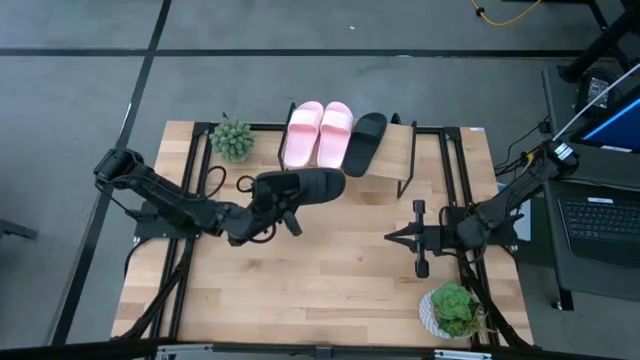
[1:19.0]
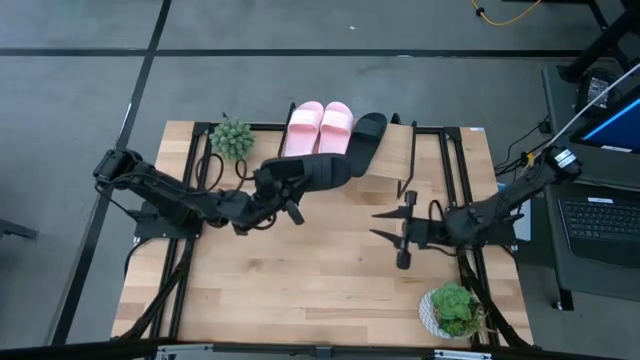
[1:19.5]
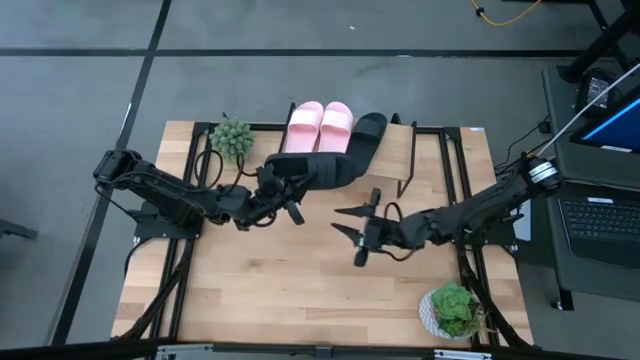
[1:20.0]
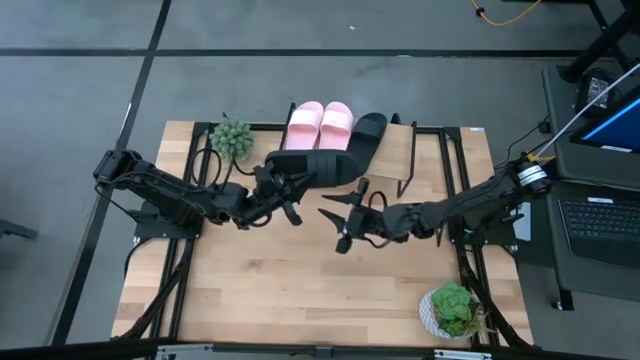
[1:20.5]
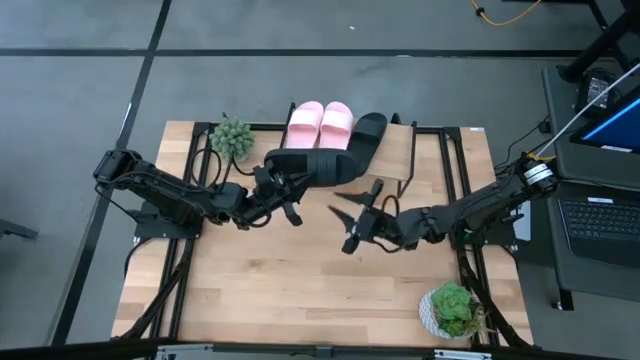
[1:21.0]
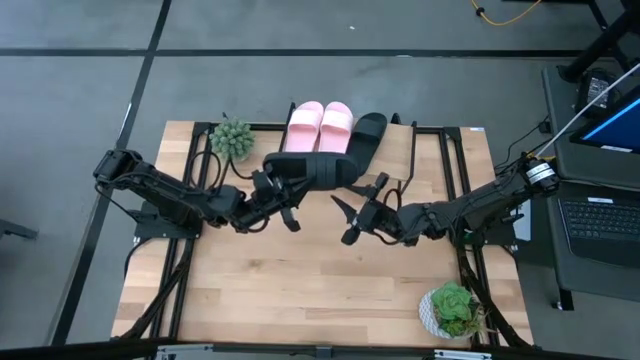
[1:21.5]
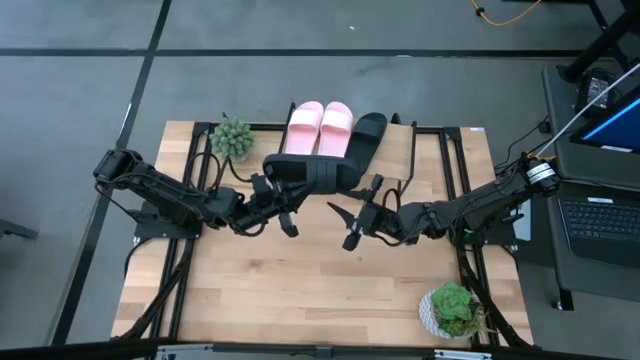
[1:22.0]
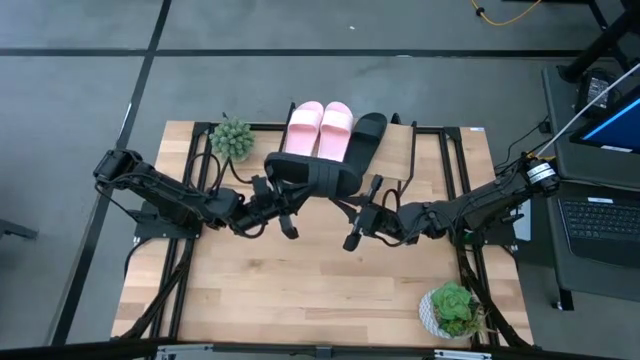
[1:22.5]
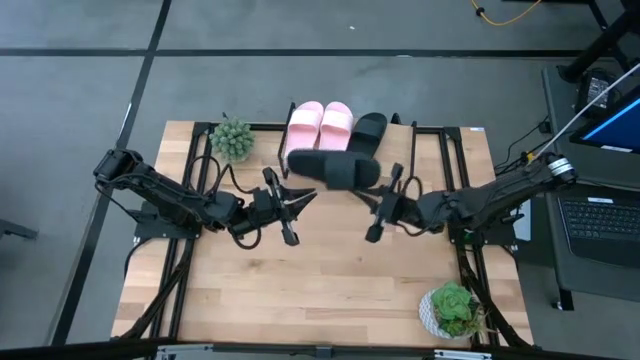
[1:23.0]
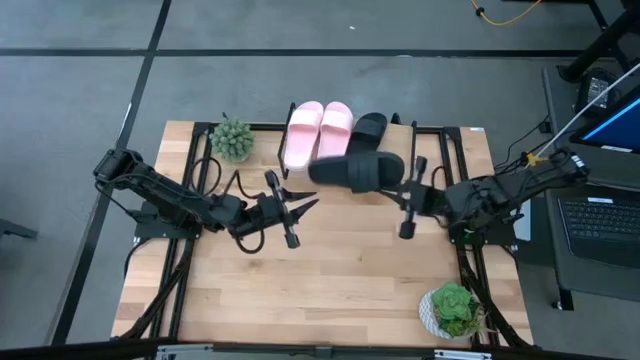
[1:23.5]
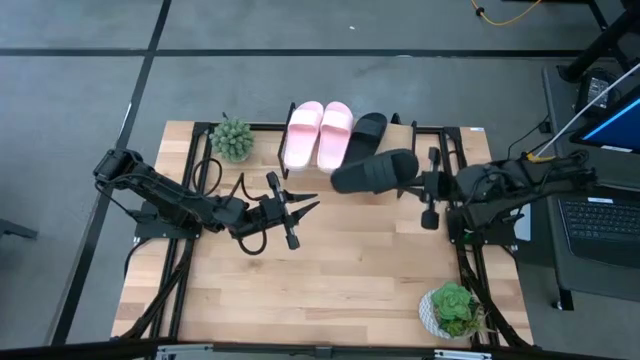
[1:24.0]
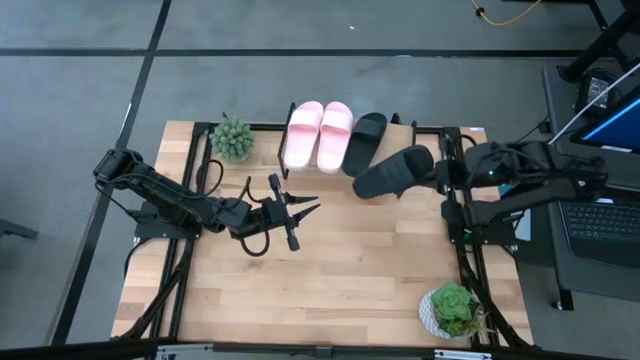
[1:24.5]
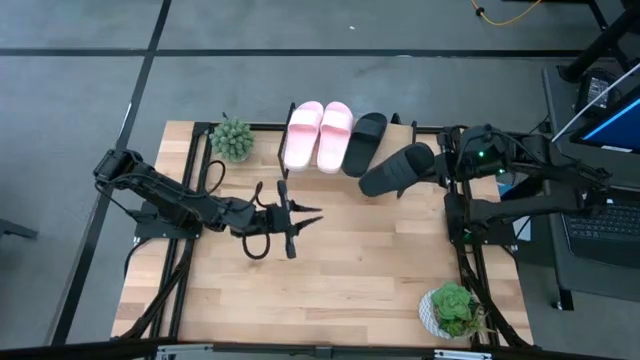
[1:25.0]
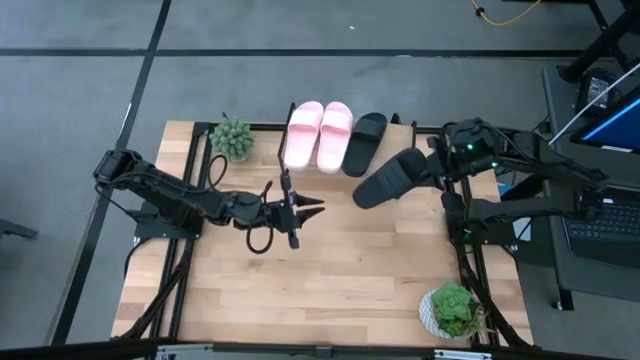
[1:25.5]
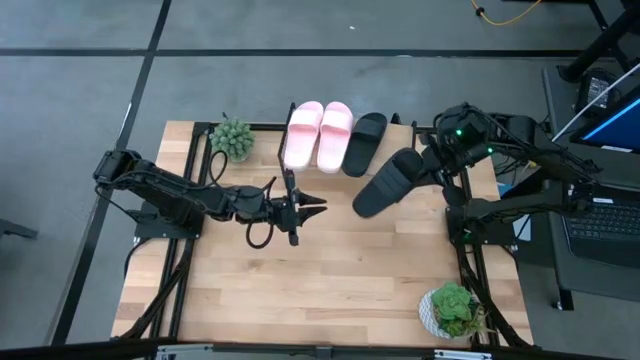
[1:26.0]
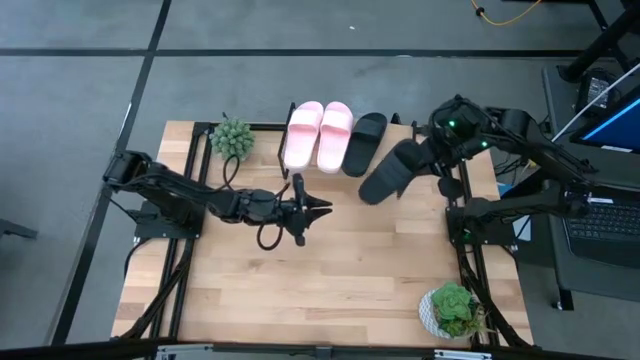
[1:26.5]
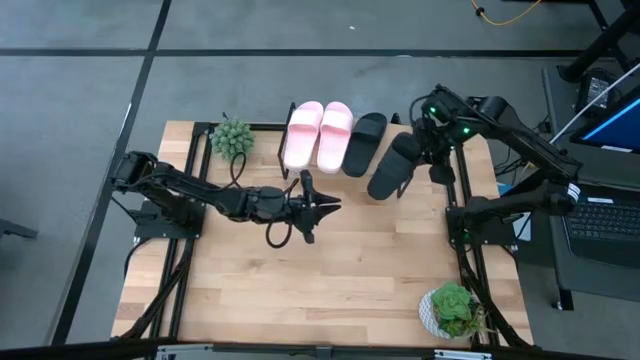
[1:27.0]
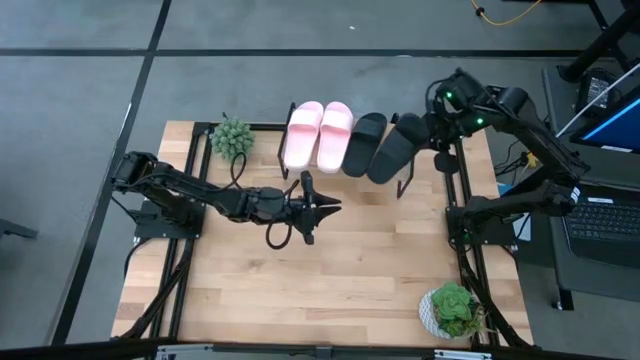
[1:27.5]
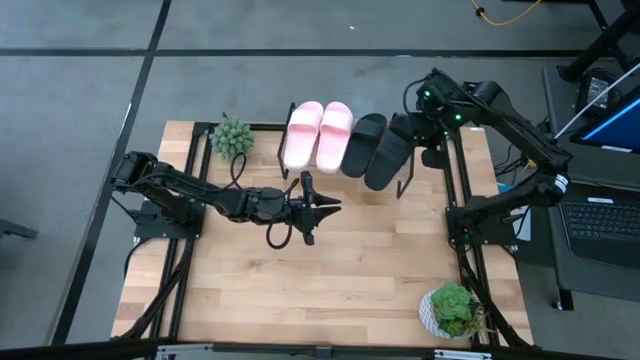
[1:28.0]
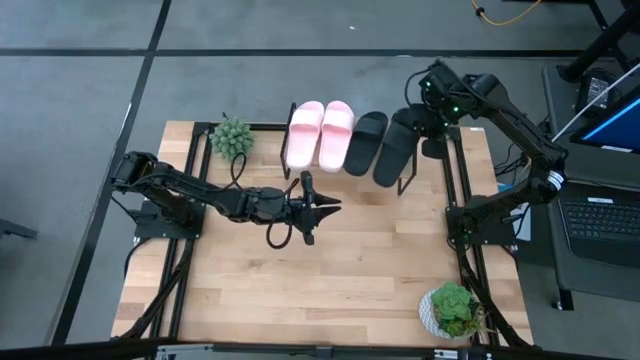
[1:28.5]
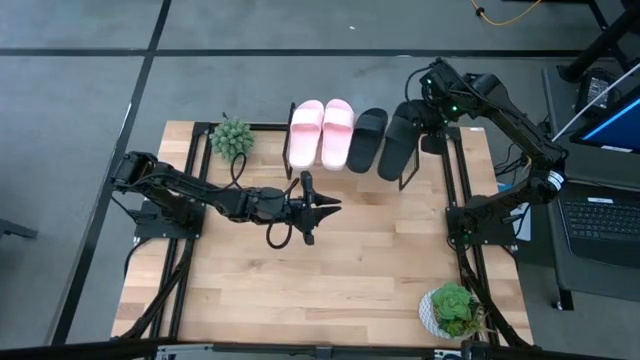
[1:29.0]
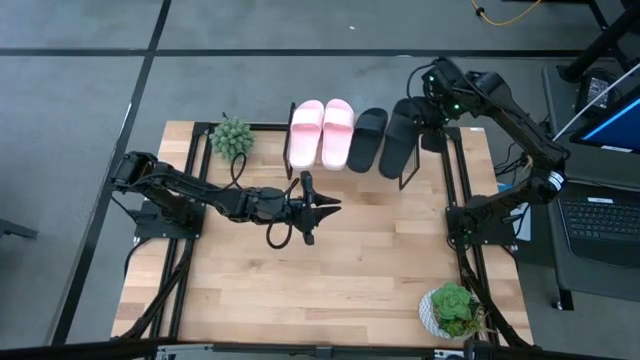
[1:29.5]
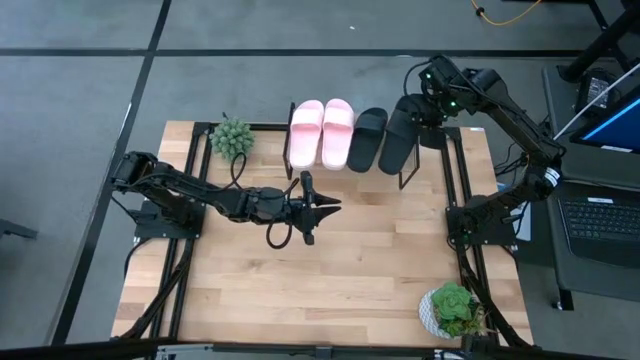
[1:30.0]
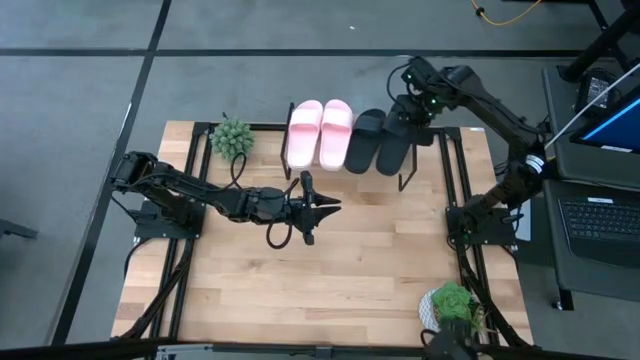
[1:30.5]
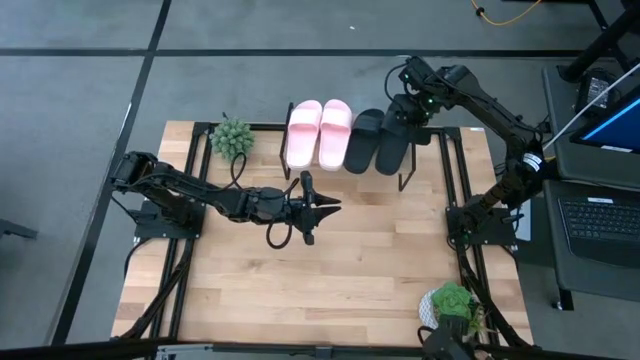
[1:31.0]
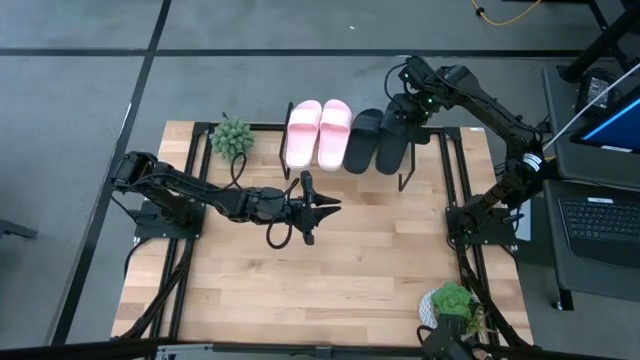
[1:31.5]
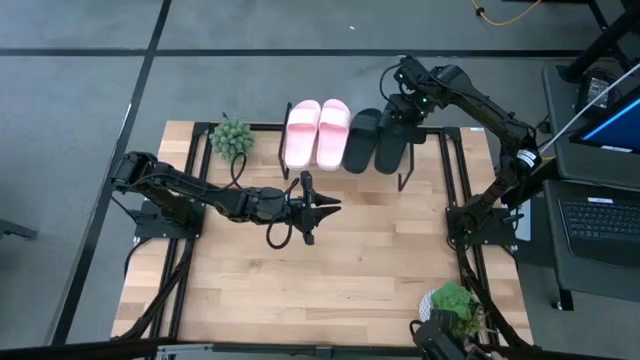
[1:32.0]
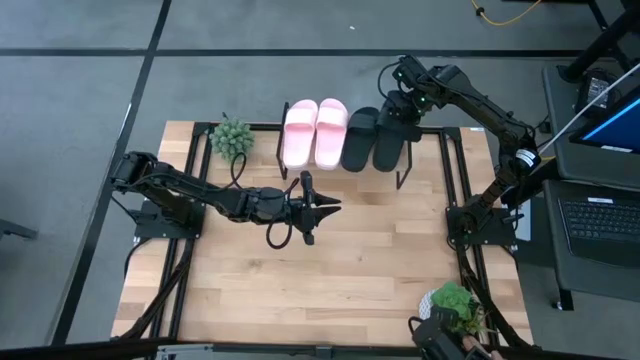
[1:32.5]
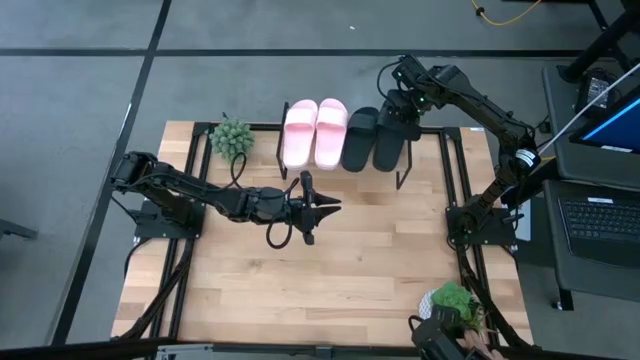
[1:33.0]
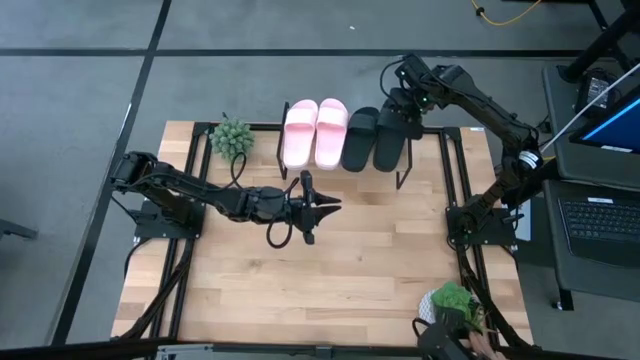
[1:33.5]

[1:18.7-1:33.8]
Task: Pick and place slides into the shelf
Put the black slipper on the shelf

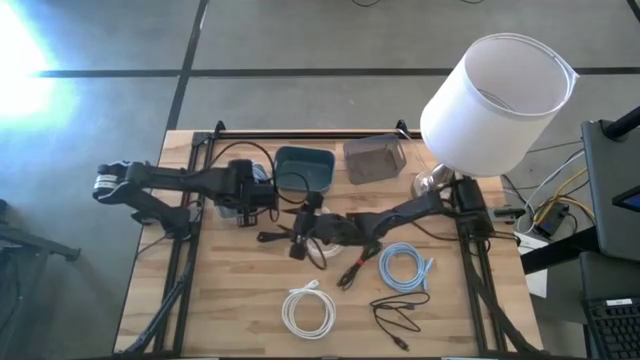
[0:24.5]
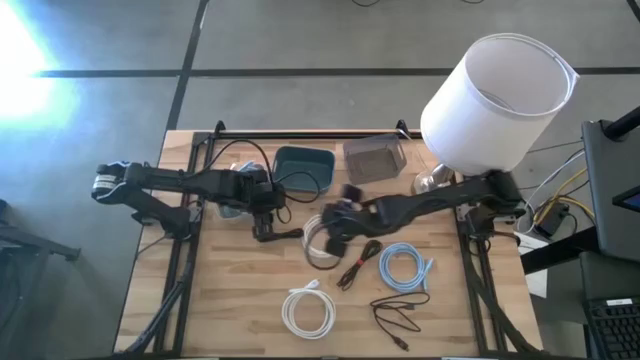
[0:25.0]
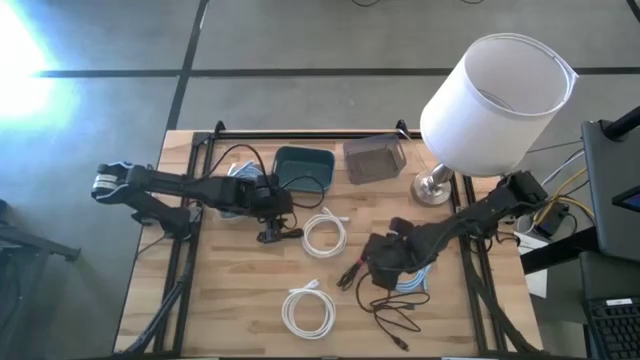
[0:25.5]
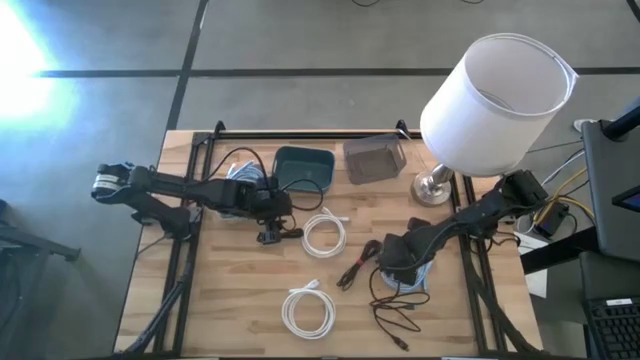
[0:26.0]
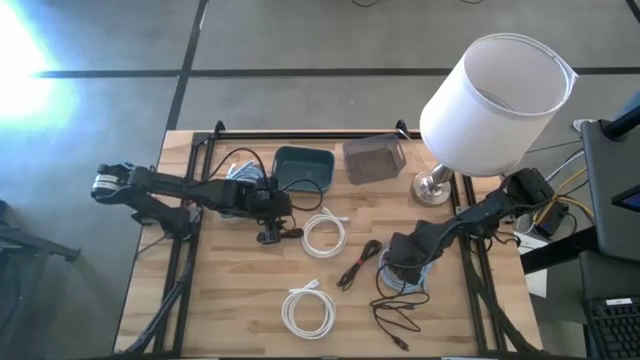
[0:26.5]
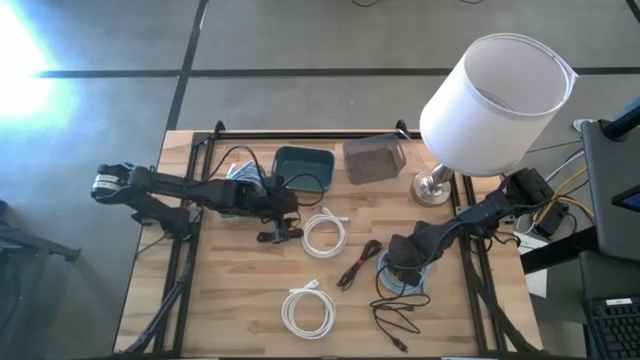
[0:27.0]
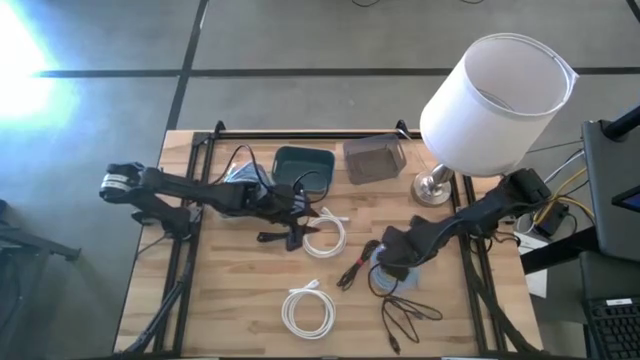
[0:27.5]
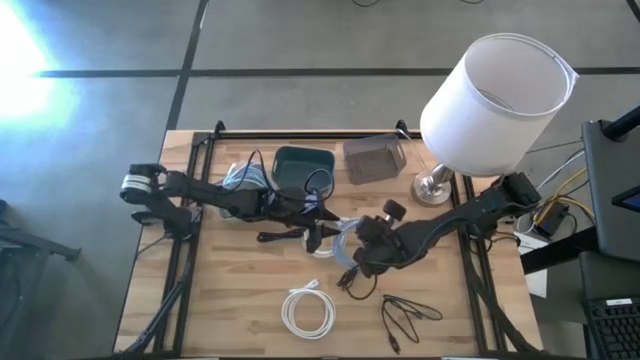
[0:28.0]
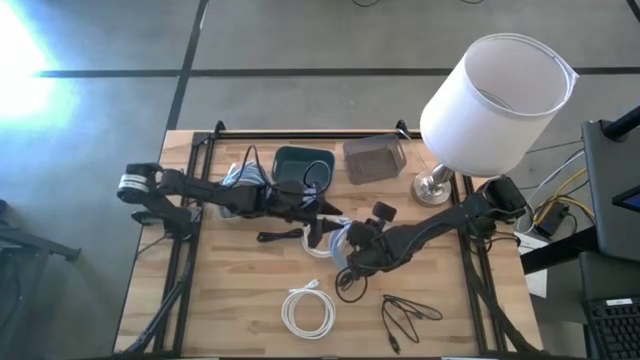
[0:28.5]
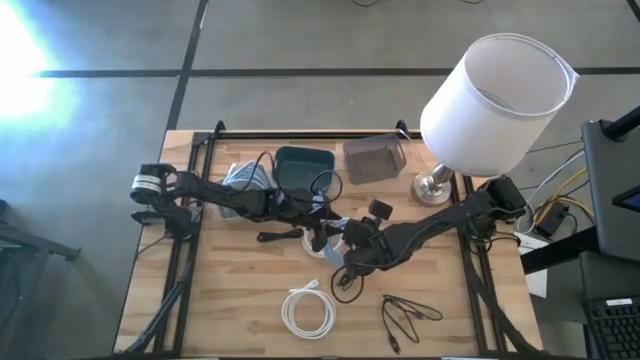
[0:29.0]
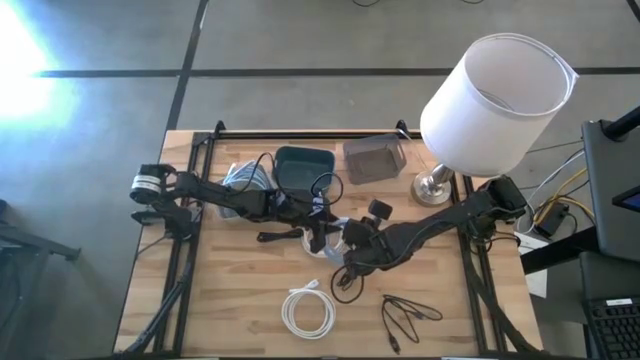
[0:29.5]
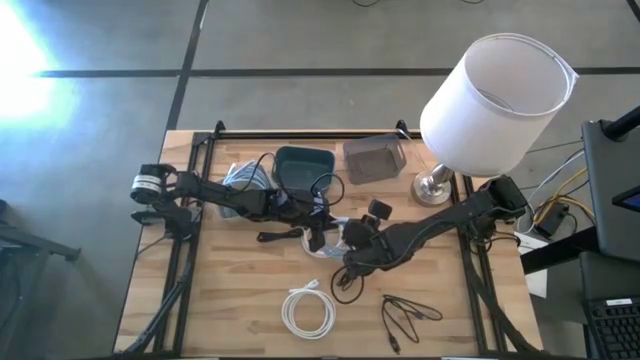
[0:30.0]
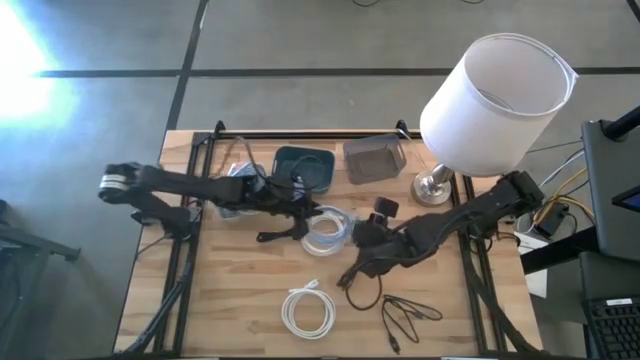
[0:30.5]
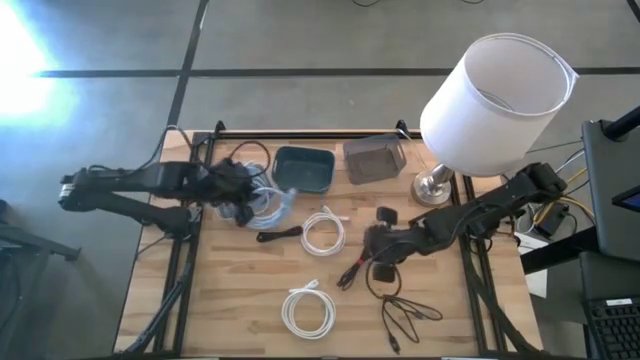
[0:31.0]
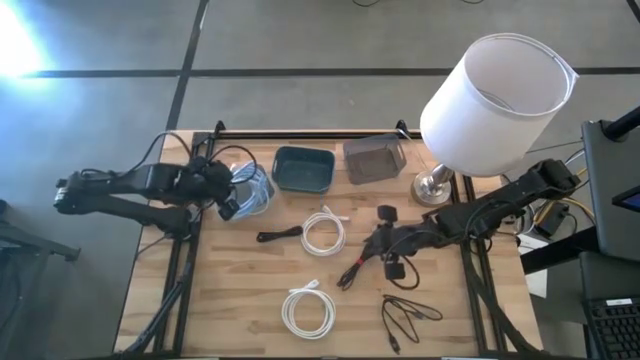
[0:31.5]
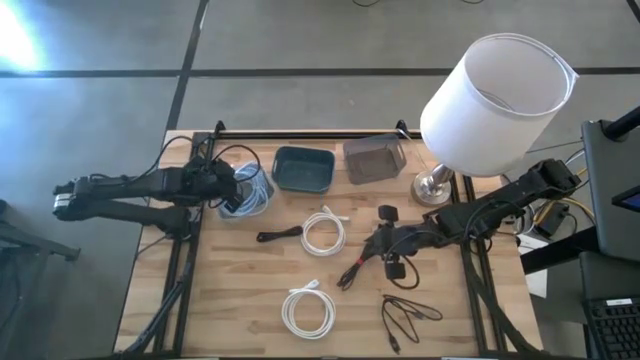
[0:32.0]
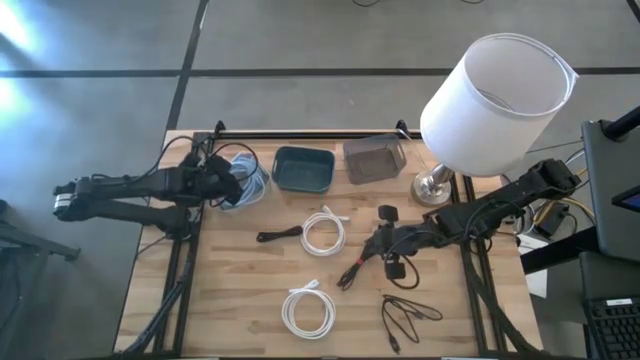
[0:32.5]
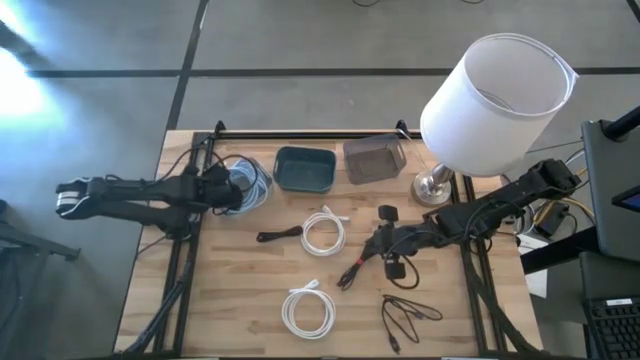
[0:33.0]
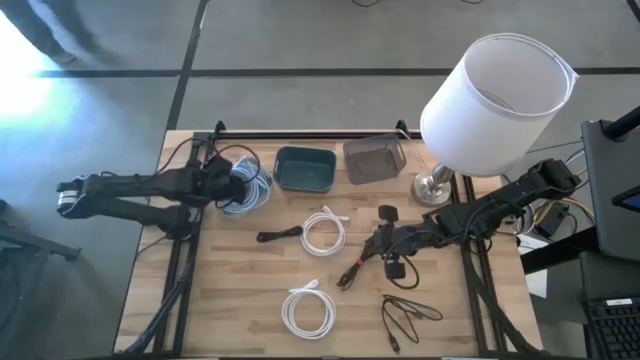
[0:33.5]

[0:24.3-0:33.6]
Task: Pick & Place USB Port
Put the light blue HDMI cable into the white bin
